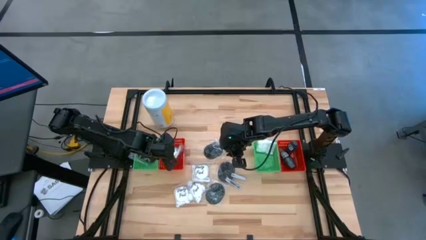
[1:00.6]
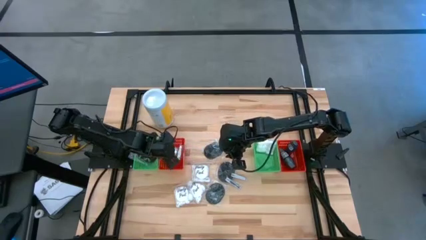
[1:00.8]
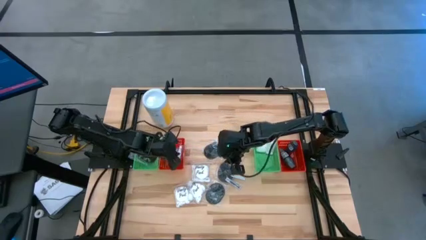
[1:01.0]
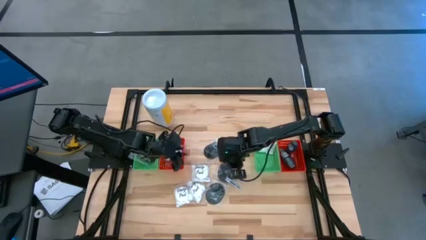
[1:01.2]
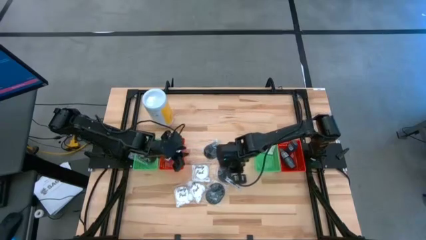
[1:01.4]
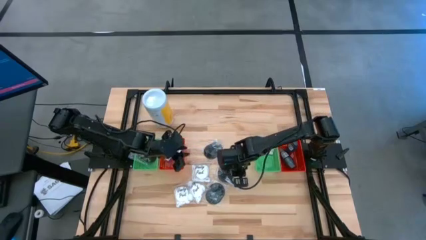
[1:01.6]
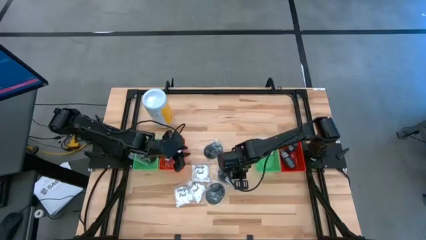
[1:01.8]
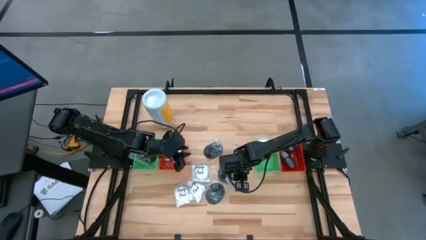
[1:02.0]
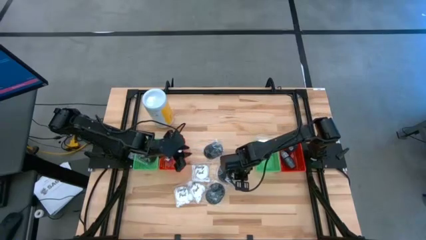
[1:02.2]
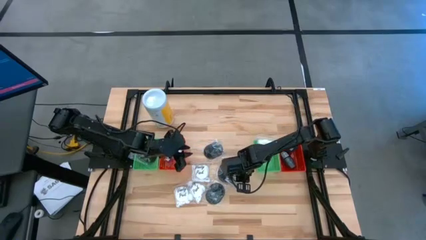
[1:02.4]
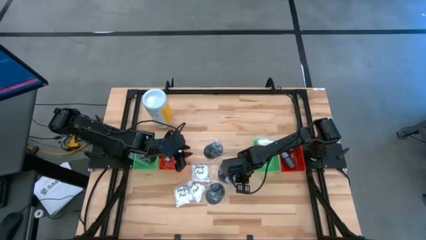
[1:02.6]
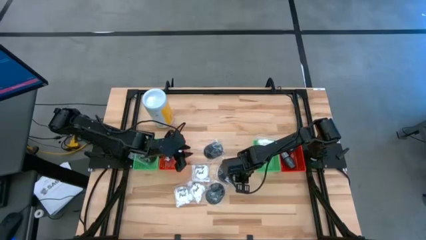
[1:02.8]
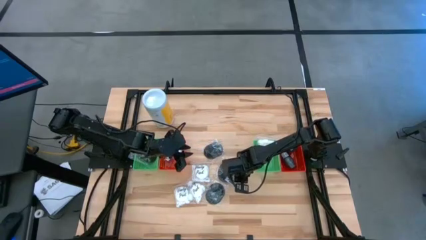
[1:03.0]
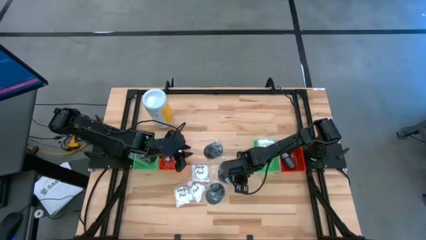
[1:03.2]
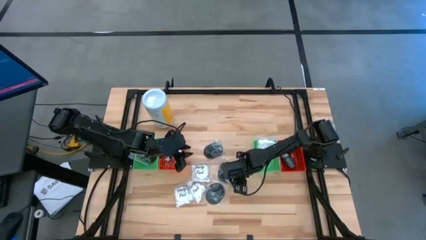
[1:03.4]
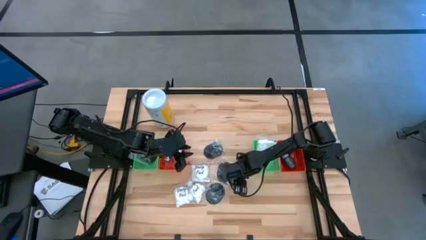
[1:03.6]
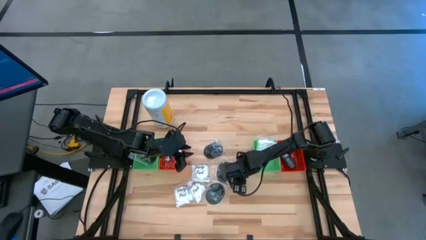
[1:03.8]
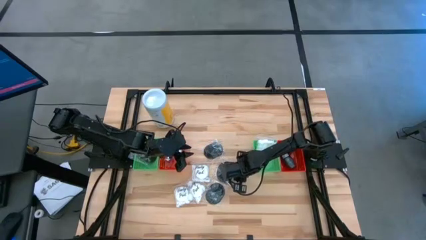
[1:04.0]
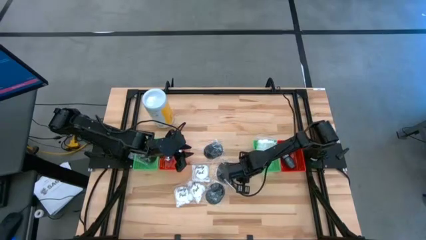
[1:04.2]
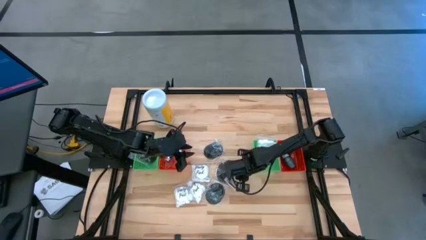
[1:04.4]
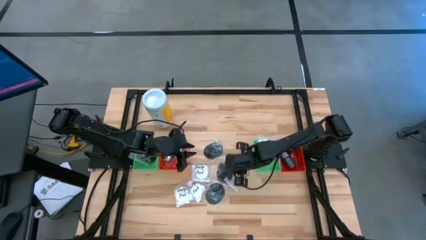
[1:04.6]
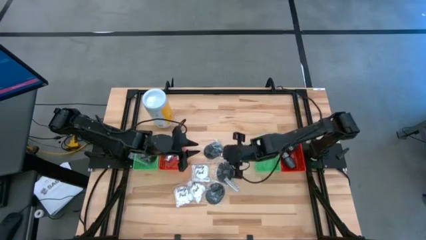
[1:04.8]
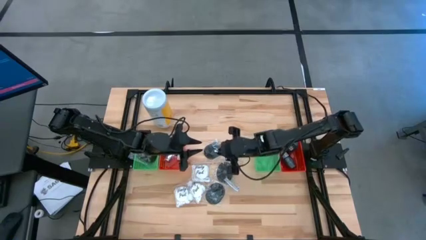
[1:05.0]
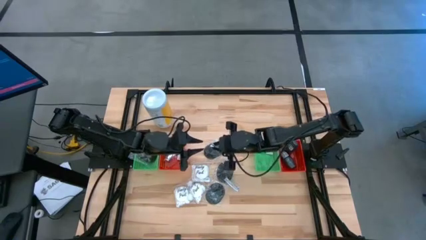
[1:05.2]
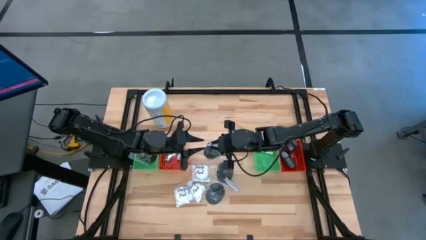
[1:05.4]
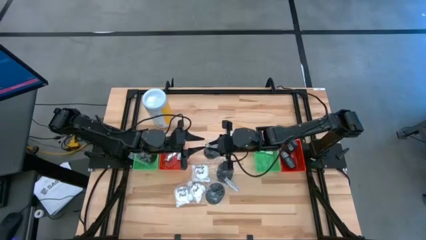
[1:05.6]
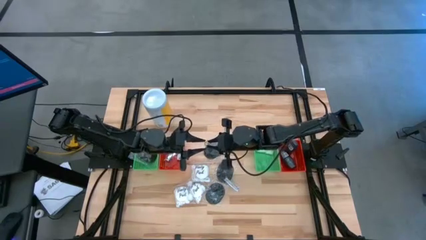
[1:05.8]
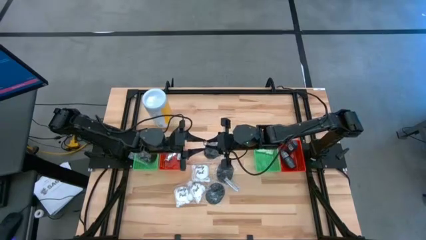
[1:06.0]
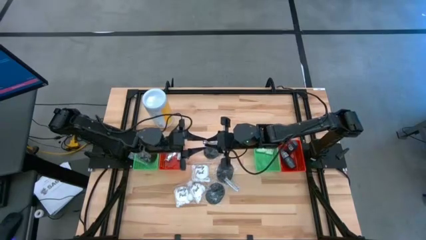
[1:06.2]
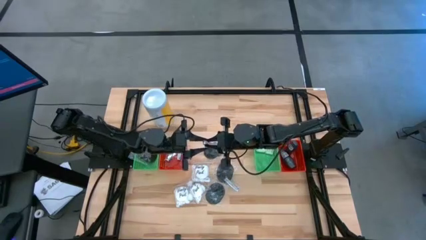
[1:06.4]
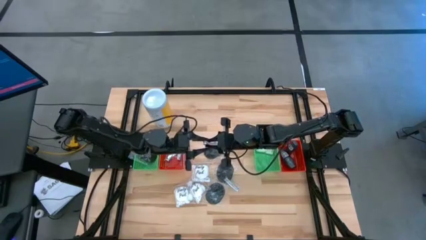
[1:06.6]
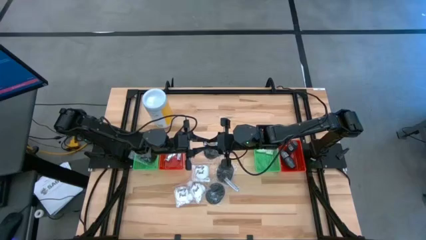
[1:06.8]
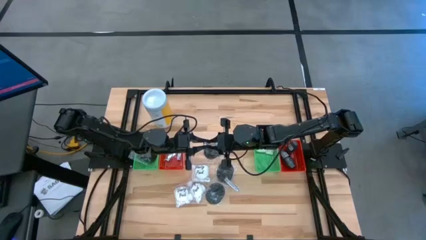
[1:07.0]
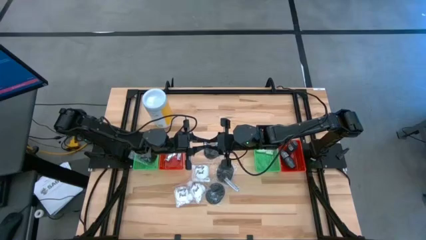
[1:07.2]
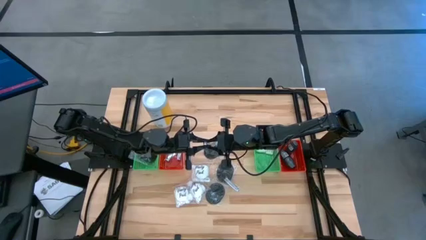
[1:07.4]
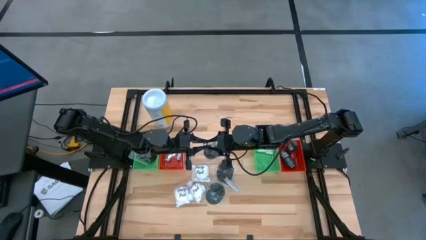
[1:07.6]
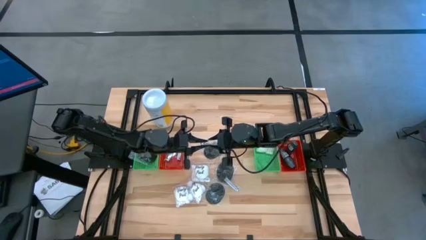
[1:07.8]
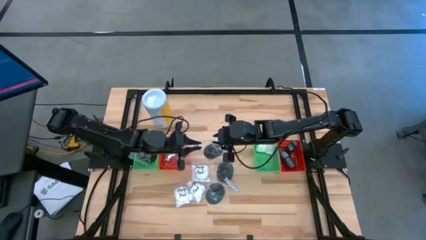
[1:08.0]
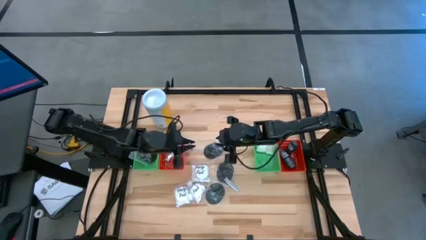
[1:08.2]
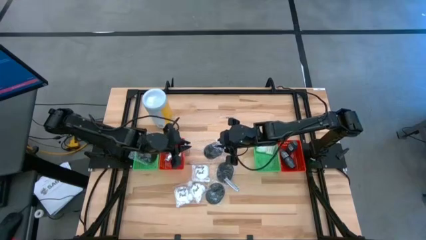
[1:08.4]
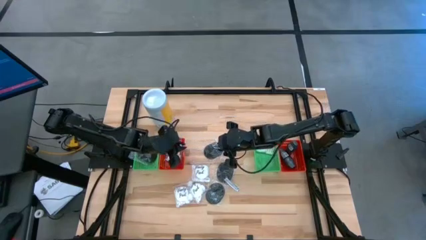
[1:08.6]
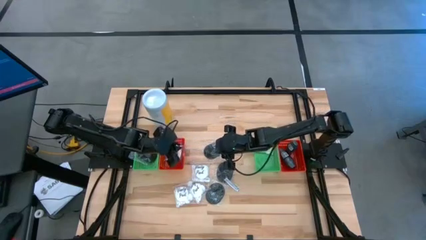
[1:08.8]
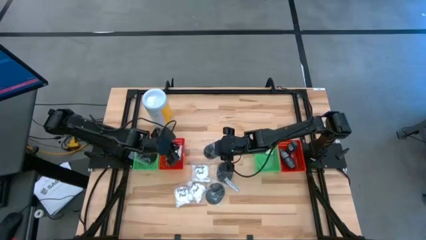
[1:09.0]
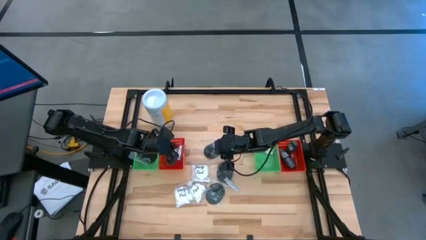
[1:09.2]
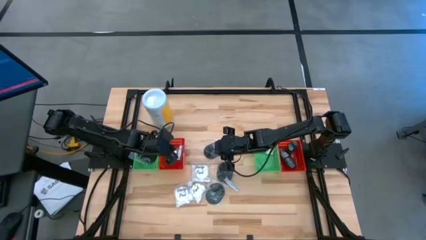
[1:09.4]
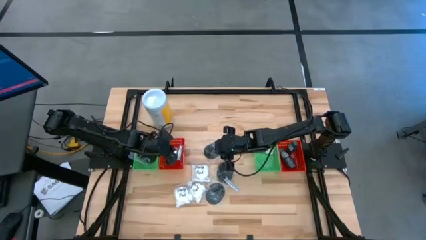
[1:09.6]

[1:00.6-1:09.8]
Task: Pick & Place Travel size toiletries
Put the silver nail cutter into the left red bin

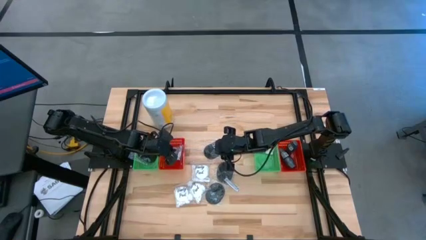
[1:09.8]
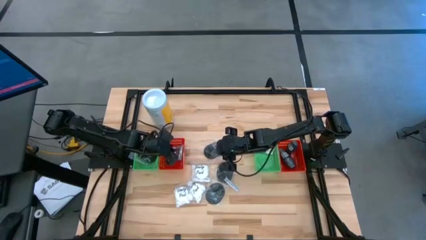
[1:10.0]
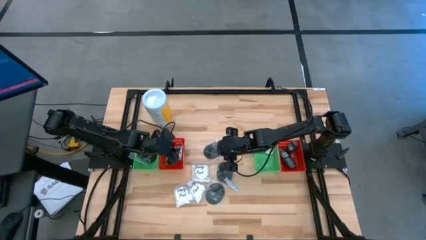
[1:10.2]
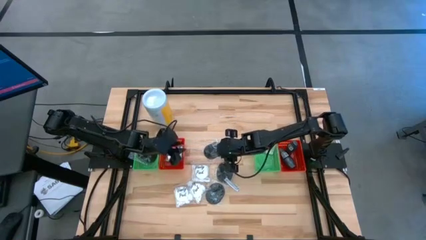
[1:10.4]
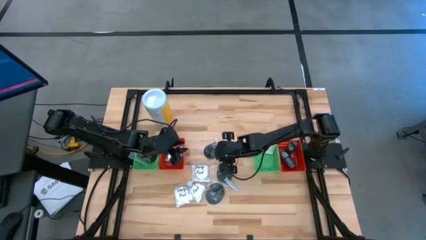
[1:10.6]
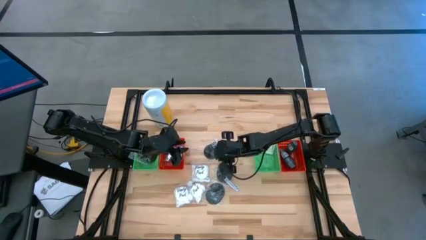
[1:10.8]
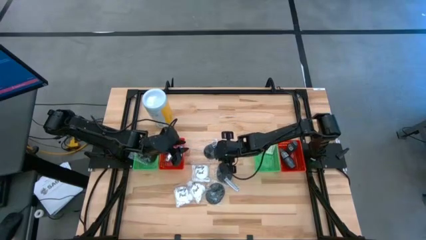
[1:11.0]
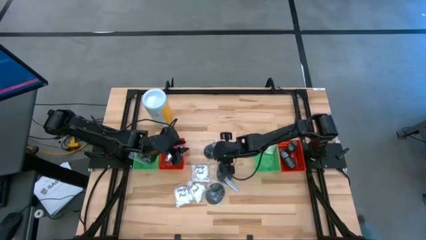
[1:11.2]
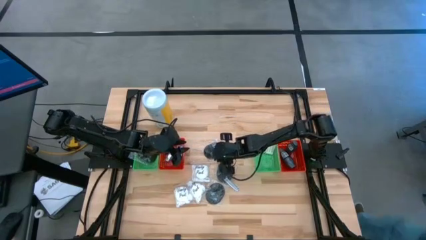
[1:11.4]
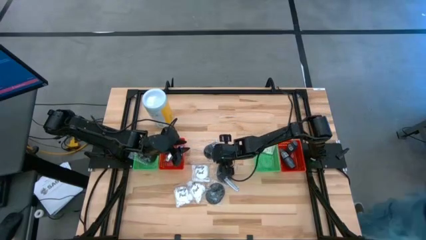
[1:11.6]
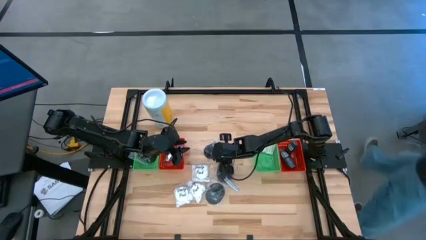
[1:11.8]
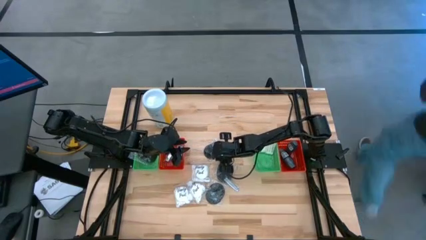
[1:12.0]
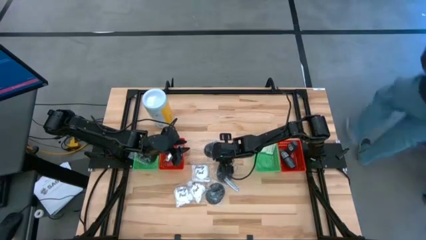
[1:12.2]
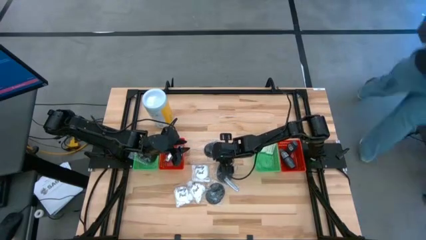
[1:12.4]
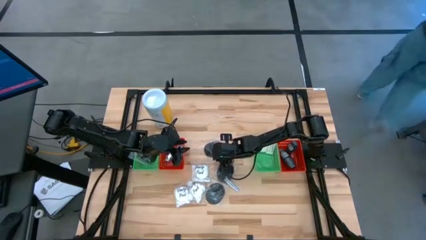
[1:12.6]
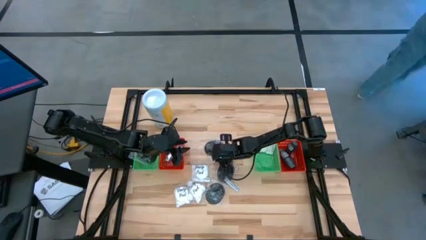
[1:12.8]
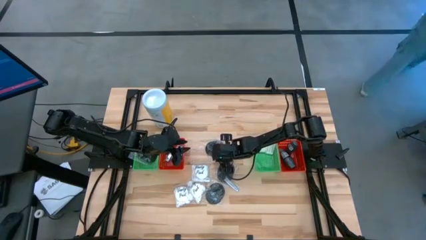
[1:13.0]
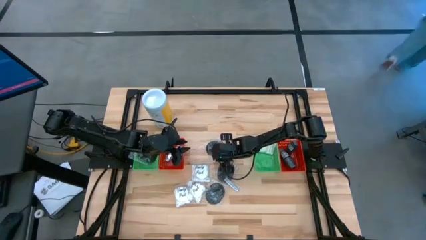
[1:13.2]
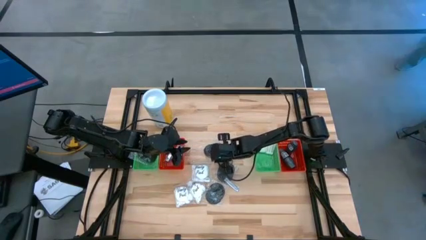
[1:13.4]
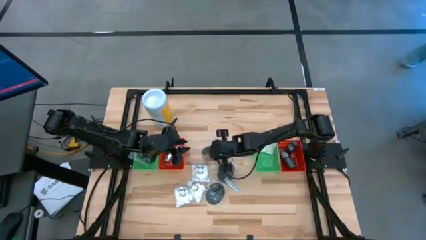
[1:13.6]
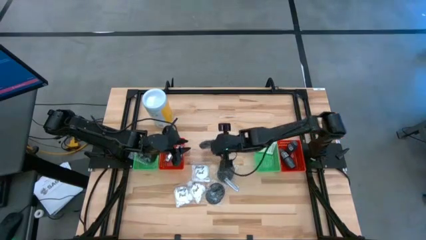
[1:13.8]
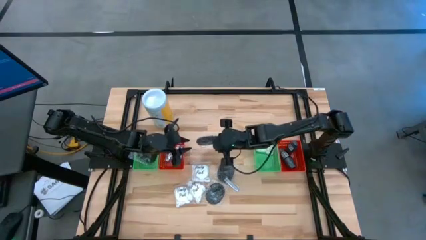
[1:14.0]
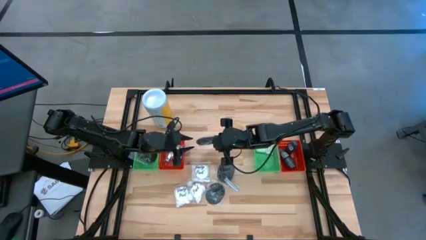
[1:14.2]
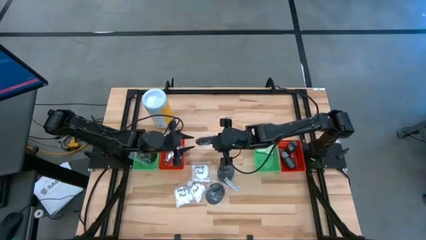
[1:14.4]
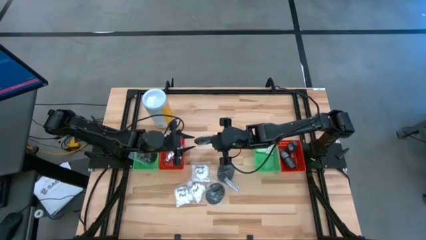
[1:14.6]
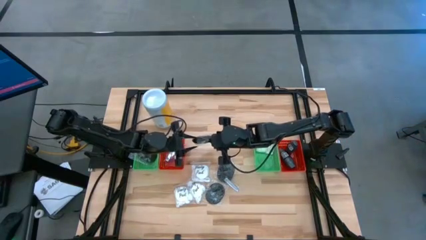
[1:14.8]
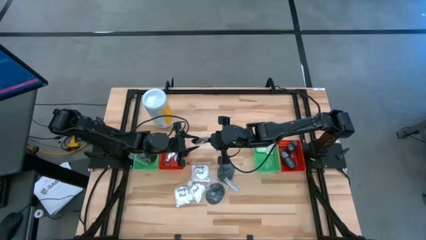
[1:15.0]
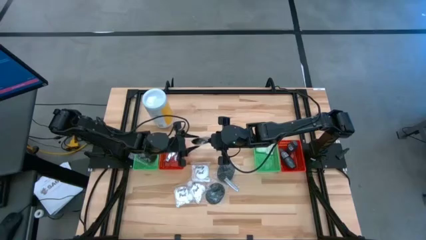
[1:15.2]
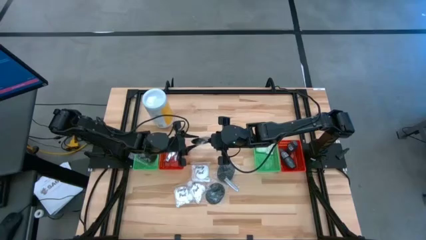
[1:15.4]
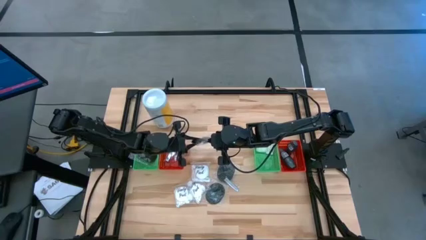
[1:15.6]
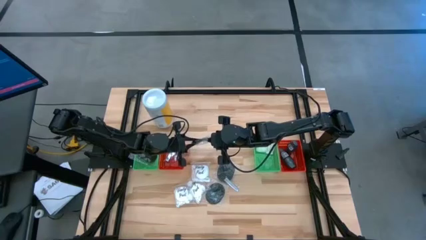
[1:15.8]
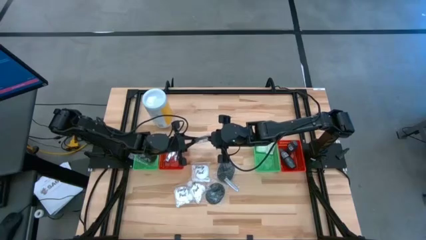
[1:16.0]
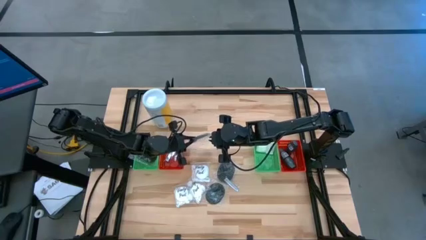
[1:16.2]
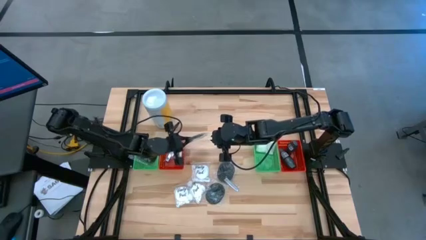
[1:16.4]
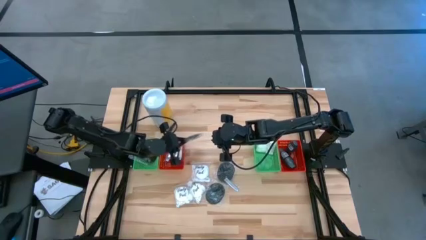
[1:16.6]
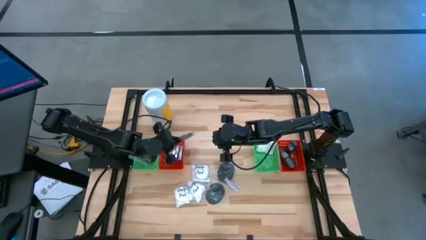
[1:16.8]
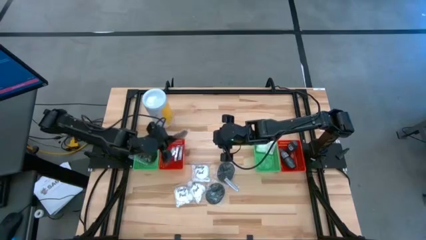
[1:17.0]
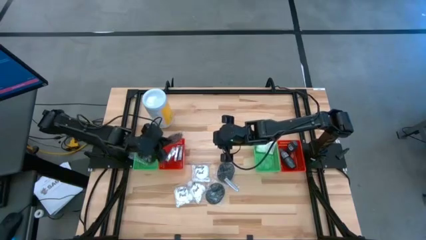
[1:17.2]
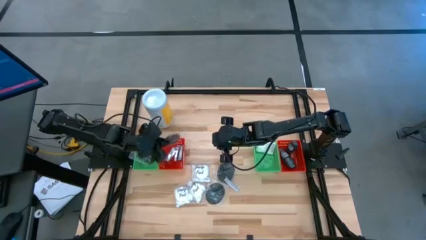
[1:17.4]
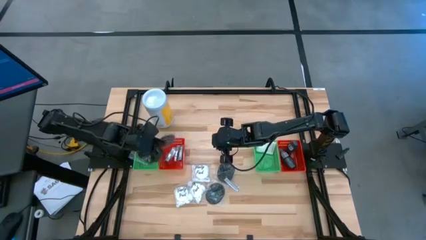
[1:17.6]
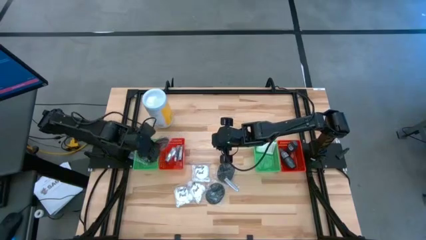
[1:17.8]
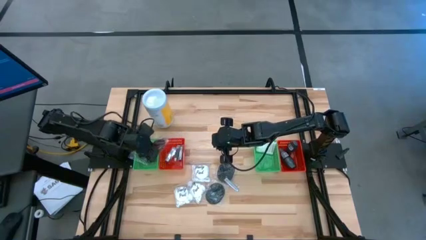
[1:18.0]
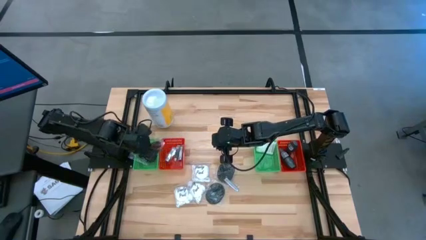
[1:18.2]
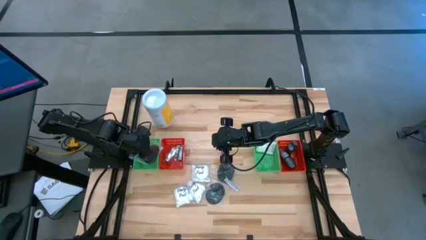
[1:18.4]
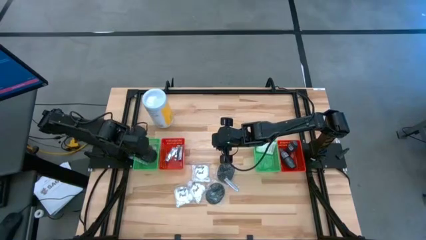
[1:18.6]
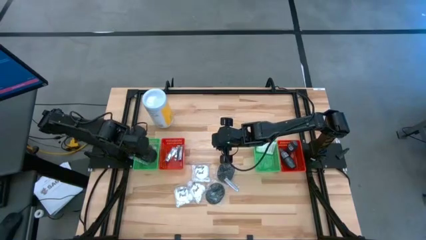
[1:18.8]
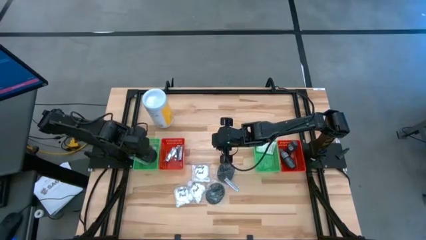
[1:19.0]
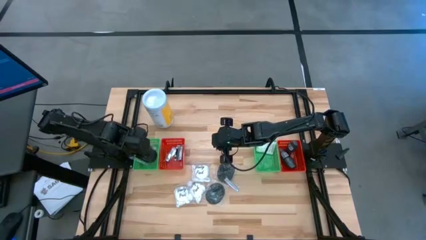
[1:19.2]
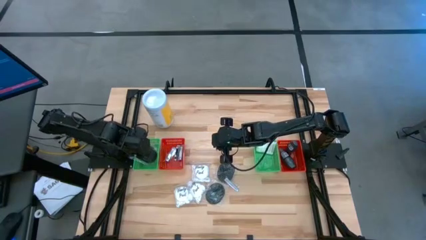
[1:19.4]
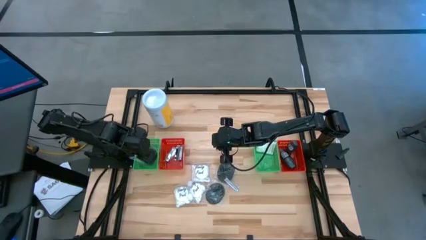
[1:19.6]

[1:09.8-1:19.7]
Put the black hair brush into the left green bin
